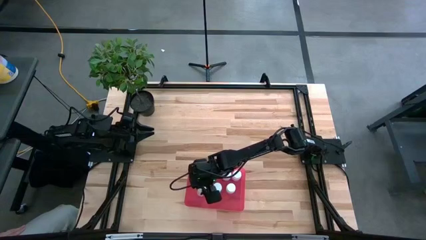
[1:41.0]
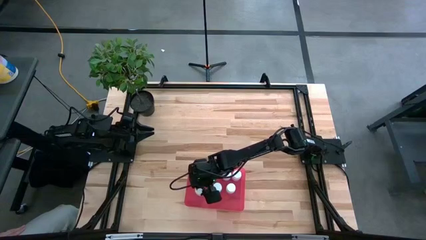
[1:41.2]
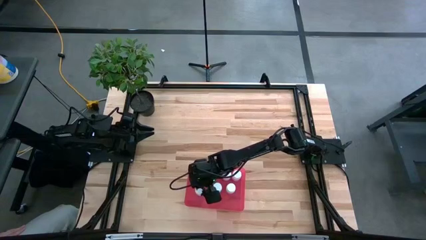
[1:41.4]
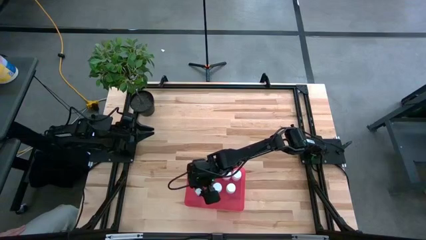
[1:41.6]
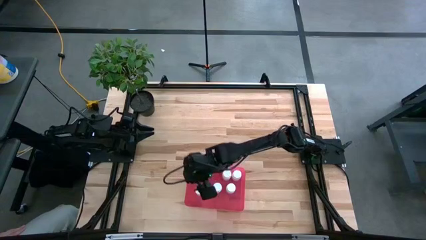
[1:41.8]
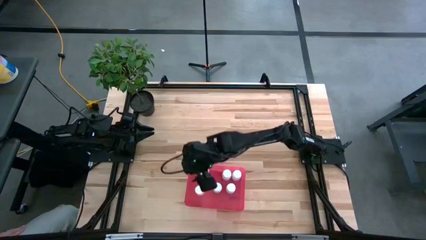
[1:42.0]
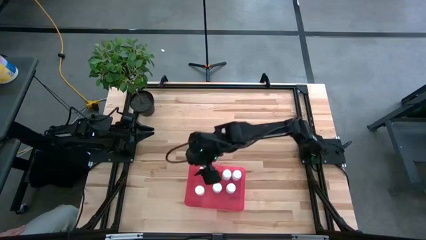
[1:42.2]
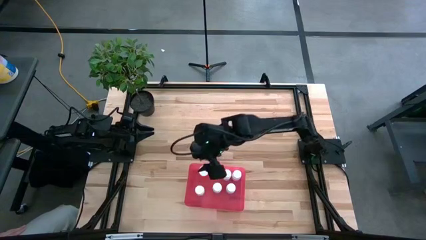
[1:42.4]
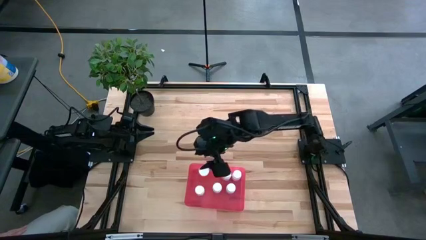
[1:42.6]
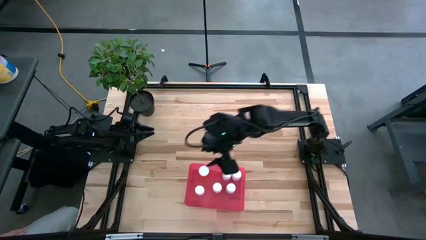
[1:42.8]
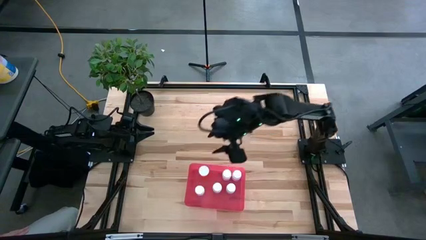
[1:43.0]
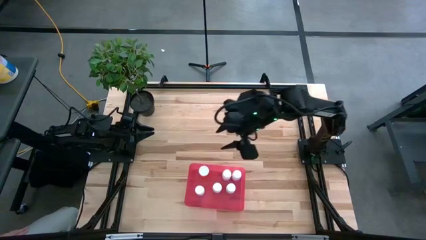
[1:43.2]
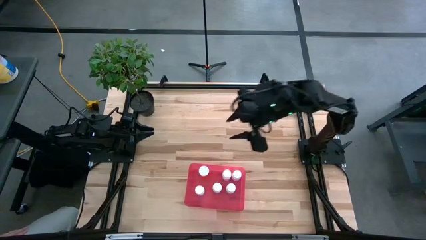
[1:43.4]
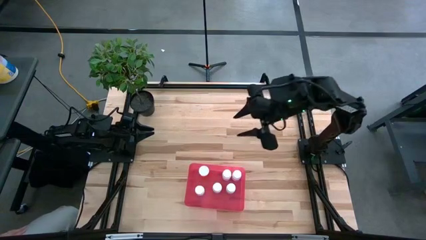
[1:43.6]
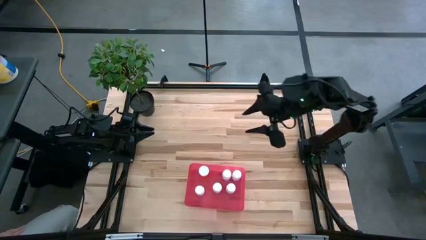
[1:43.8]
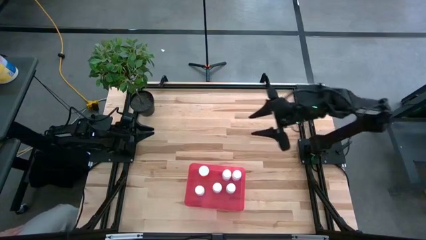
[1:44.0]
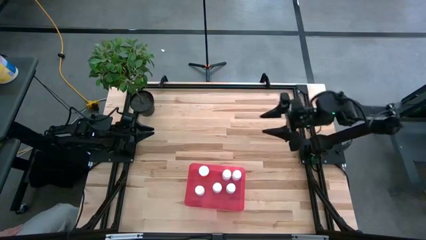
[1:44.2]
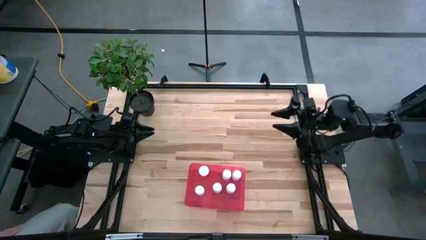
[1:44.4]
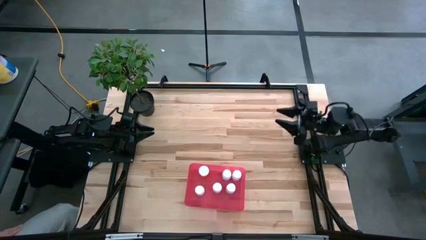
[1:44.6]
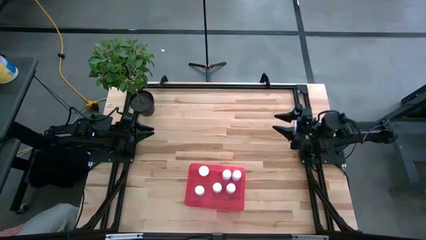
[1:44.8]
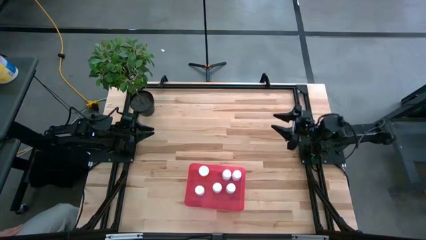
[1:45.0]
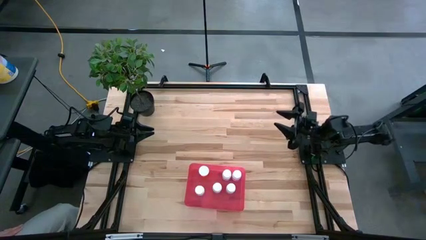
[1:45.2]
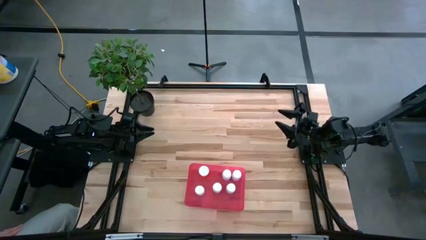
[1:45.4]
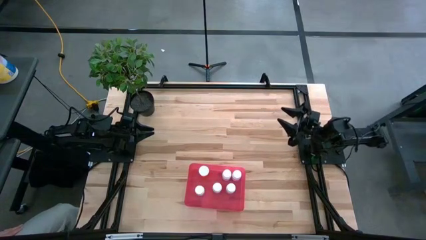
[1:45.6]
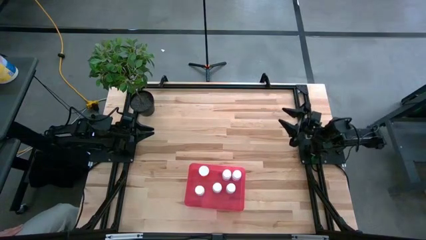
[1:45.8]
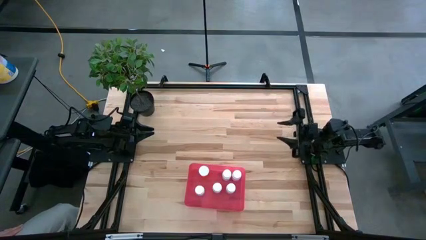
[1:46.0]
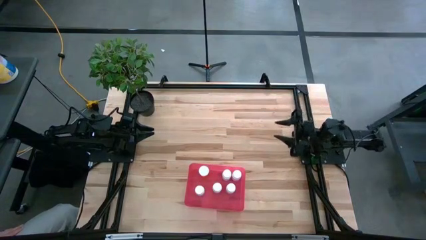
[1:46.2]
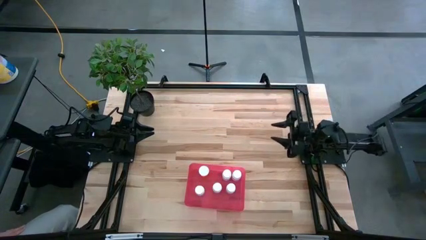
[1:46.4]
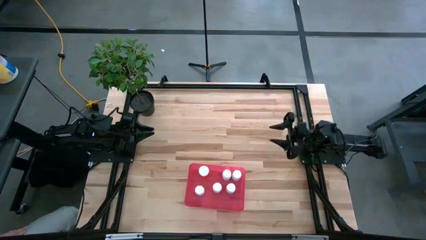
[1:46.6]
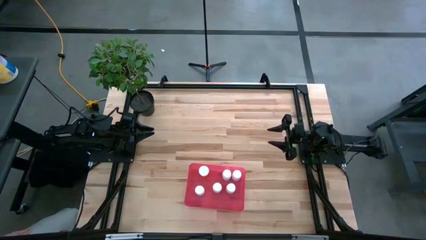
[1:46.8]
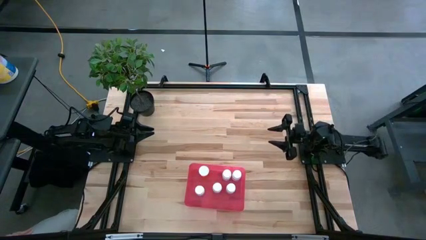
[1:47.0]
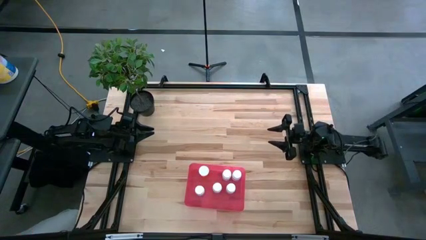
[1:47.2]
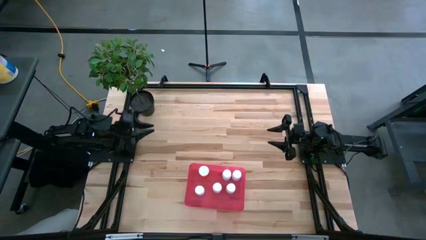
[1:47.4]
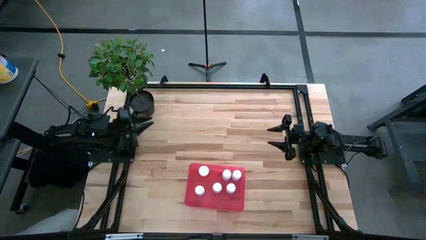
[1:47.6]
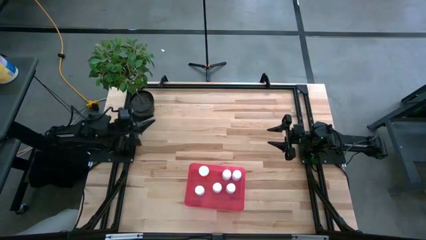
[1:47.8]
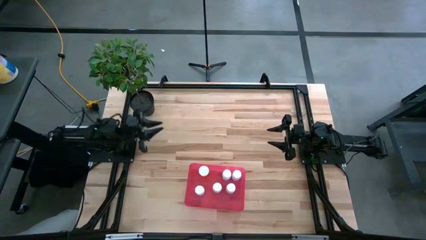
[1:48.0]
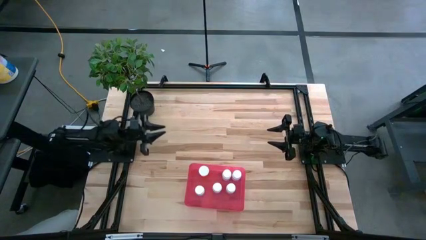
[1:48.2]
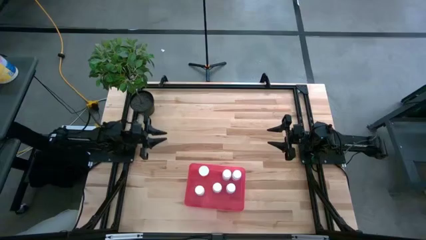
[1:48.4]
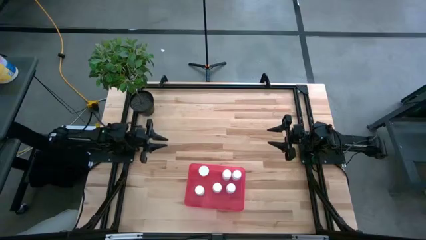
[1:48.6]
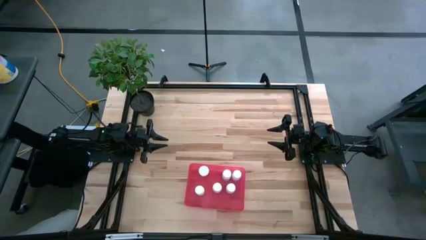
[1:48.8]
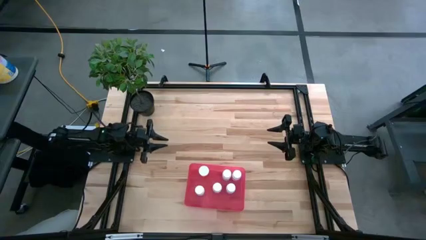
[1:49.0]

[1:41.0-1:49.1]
Task: Pick and place pill bottles into a basket
Return to Home Position

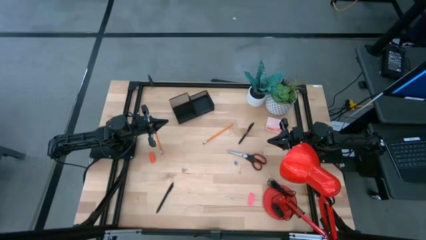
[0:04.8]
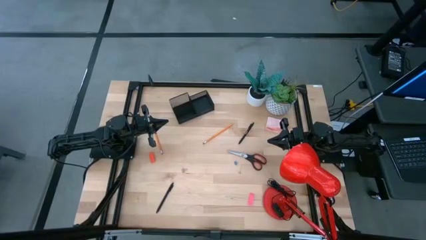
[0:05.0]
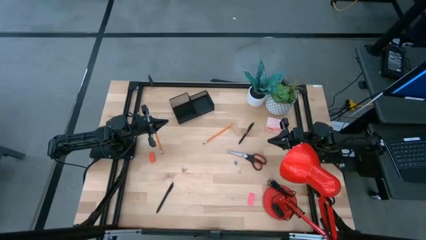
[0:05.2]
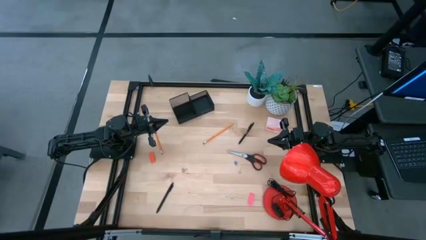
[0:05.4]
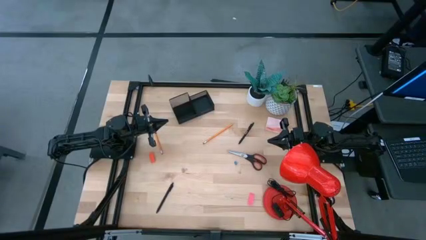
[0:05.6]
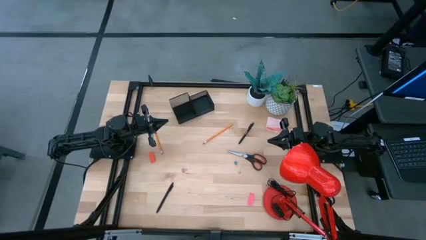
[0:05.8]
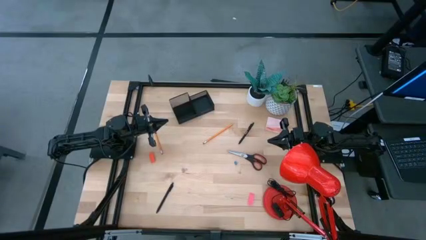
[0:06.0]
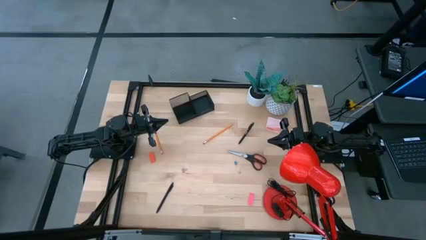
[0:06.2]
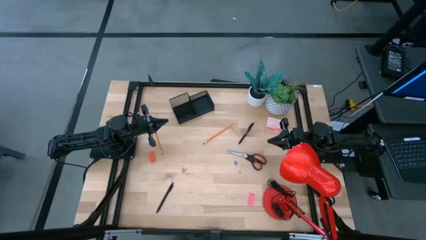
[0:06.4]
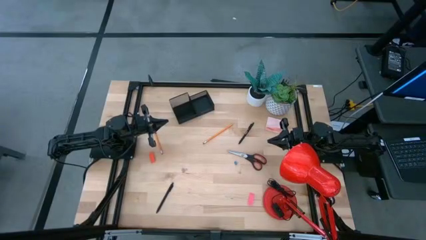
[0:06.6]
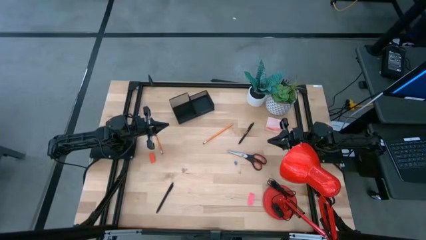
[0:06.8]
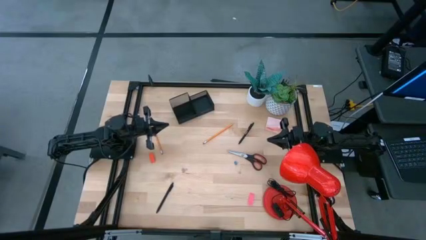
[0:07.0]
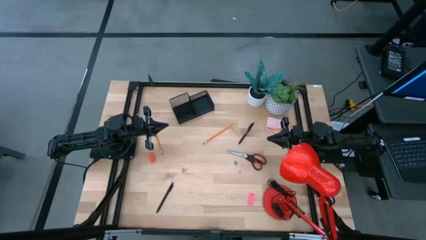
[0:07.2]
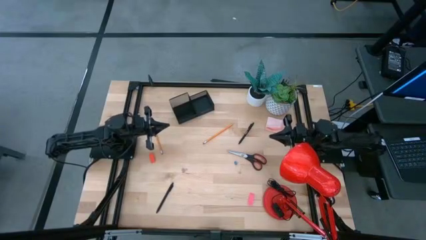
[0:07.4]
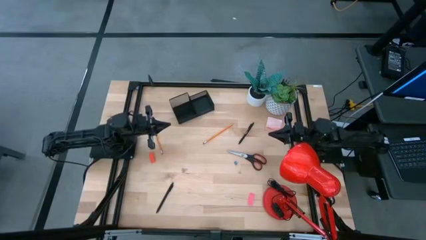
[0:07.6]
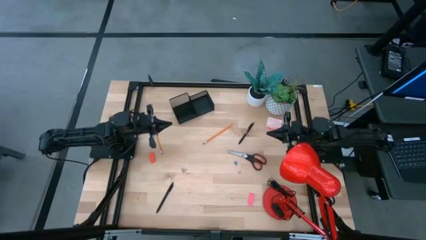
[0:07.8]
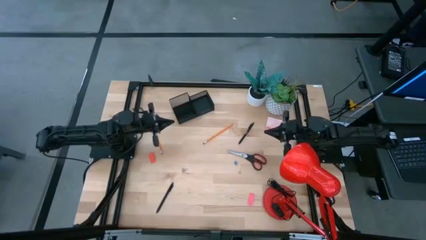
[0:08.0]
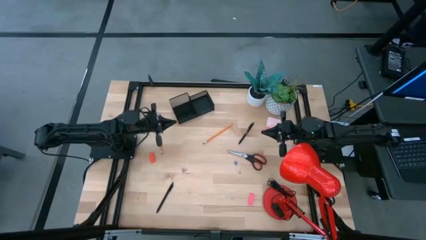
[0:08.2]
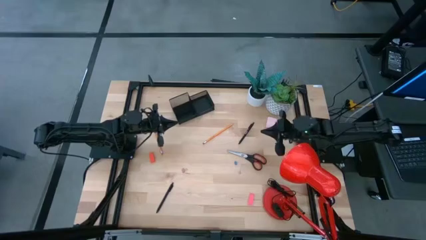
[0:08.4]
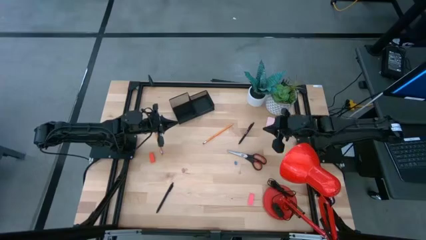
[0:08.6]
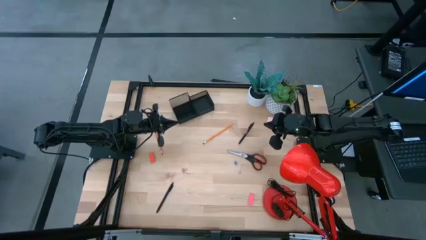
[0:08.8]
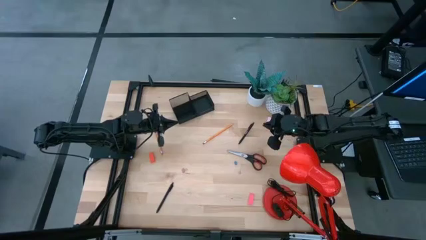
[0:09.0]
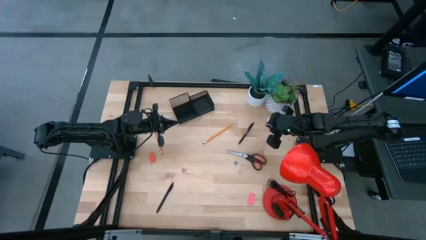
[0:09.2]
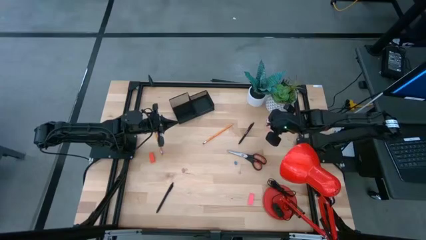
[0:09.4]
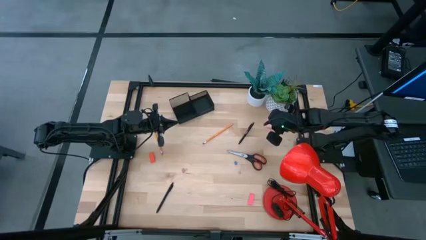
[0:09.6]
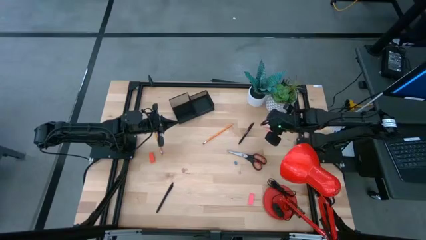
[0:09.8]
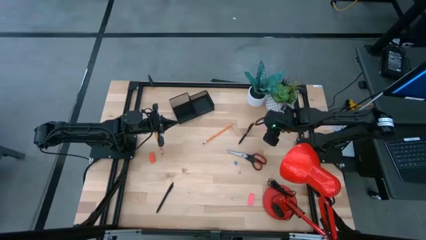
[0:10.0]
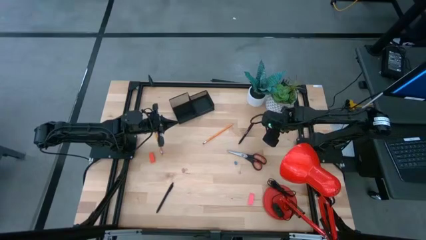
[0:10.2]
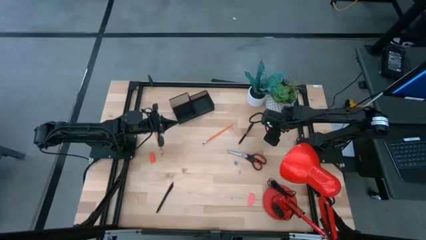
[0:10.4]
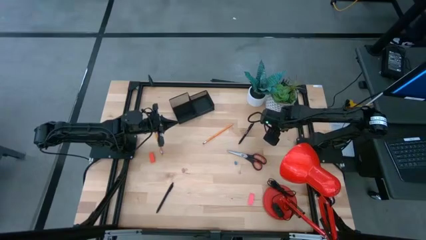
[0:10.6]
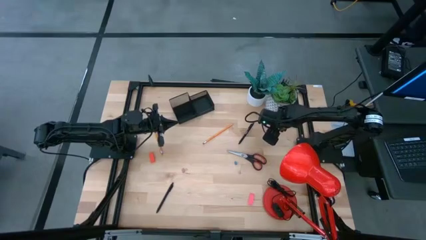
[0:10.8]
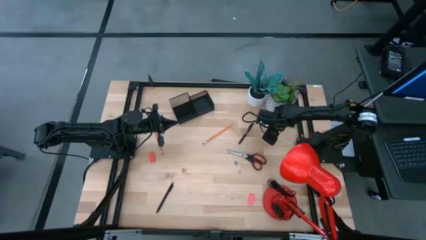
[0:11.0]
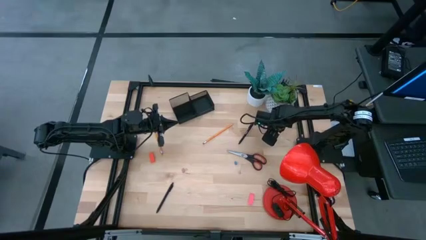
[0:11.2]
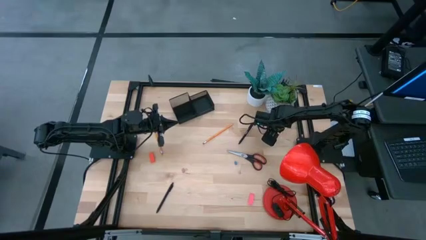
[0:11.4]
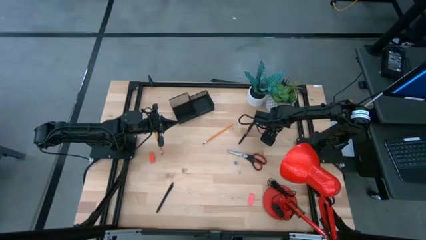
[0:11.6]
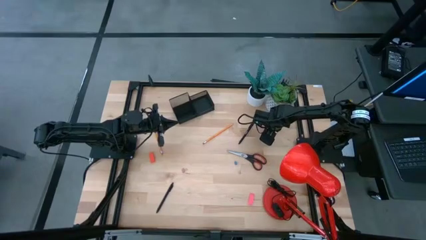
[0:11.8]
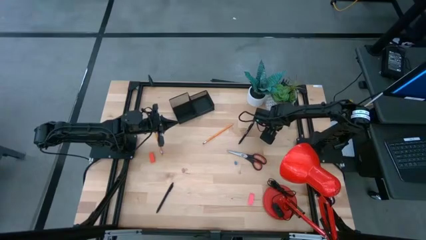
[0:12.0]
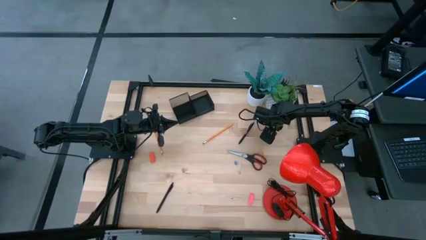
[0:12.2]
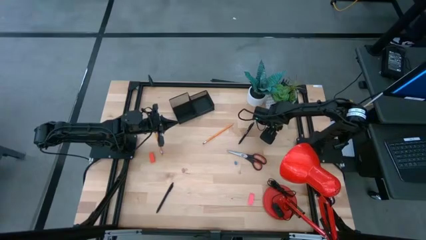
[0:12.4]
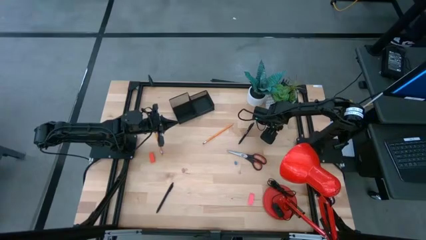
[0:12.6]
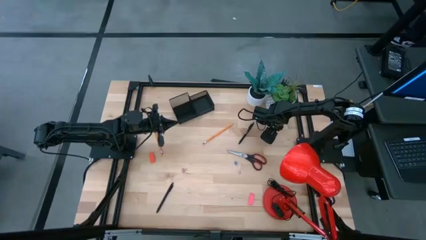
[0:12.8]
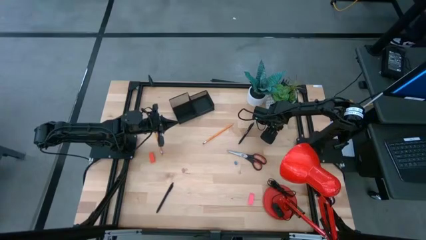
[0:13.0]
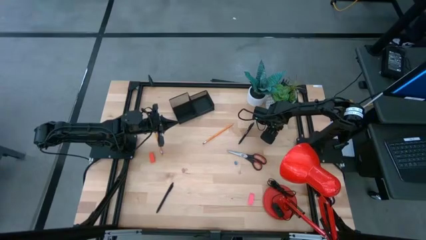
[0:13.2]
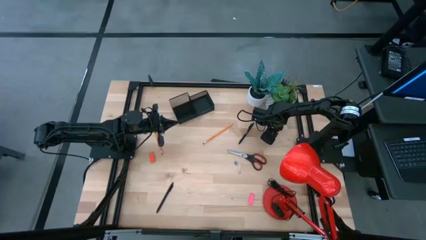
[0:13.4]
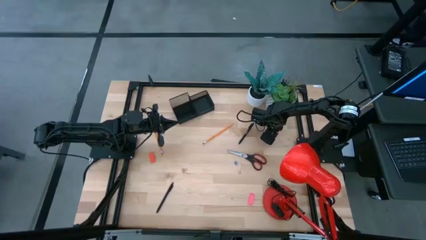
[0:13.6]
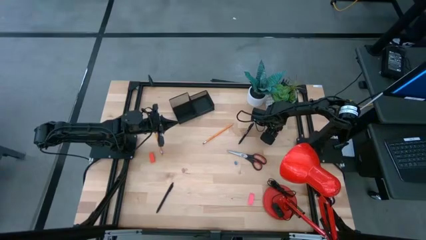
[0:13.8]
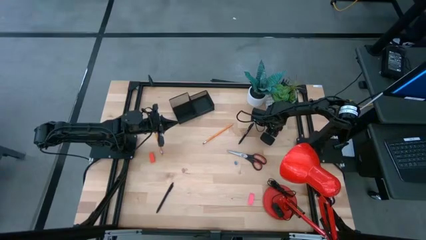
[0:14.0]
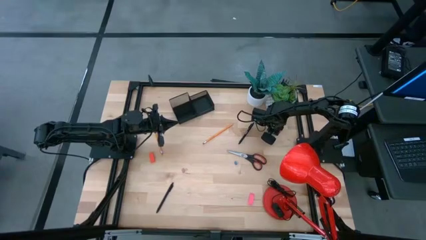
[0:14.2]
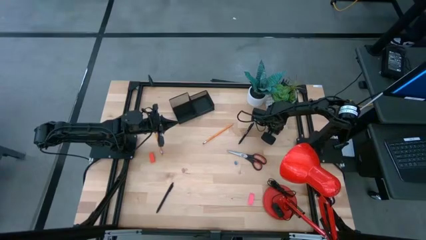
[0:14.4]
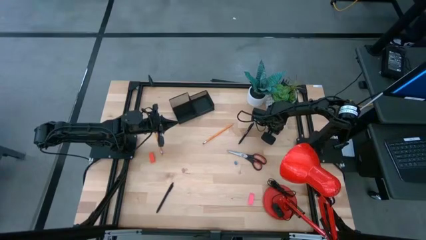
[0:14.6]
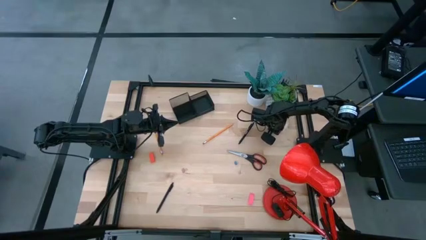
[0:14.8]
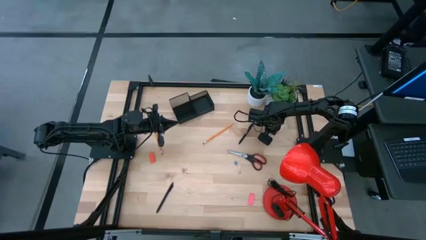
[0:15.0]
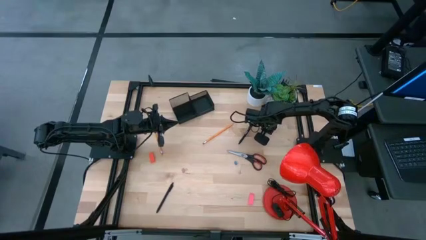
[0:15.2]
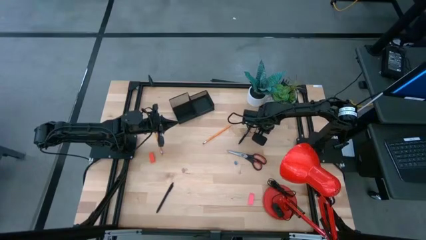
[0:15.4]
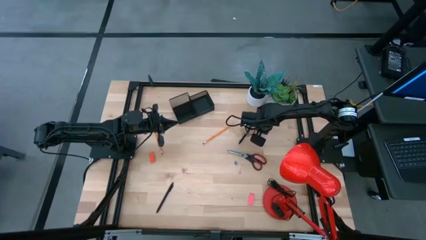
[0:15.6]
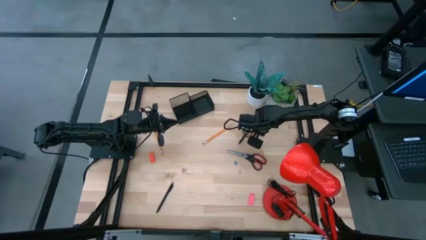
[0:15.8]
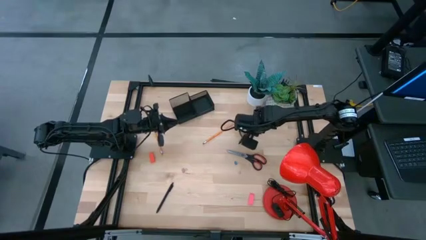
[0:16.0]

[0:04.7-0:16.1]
Task: Pick and place office supplies into organizer
Put the sticky note into the desk organizer
